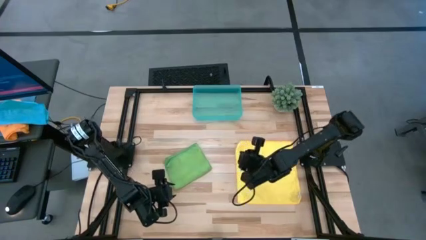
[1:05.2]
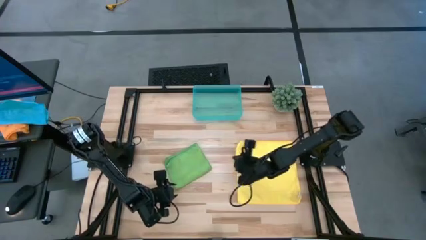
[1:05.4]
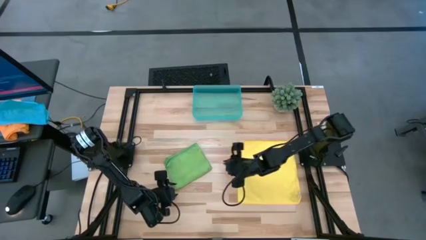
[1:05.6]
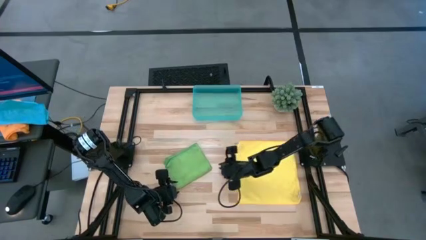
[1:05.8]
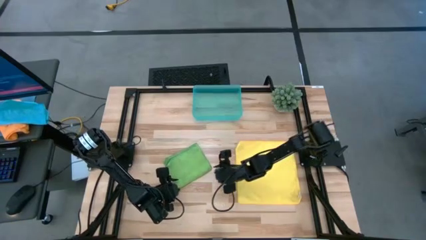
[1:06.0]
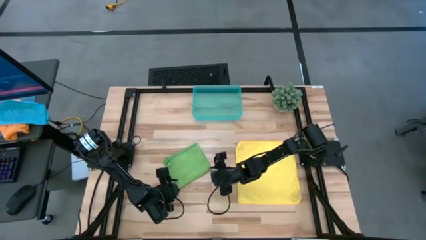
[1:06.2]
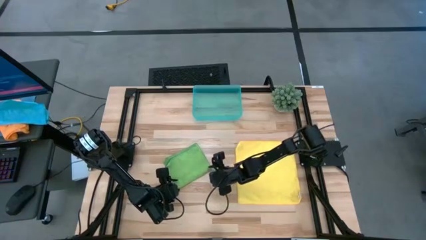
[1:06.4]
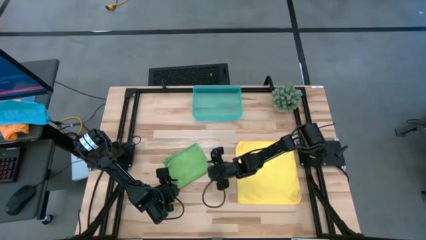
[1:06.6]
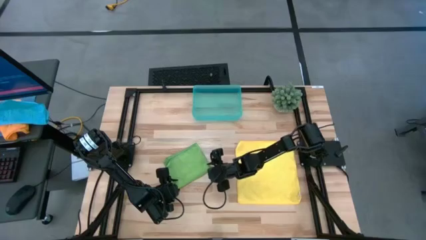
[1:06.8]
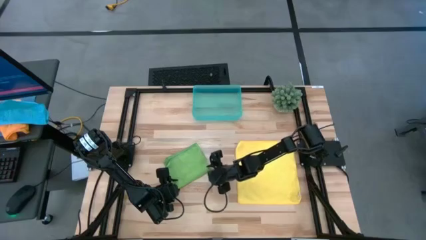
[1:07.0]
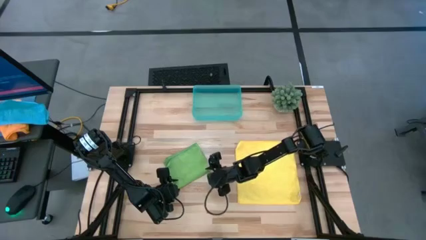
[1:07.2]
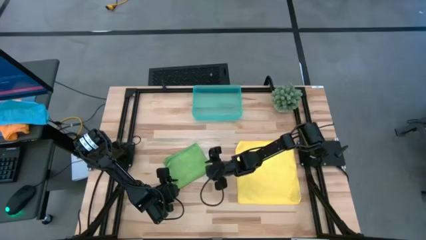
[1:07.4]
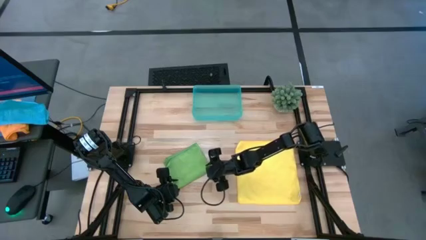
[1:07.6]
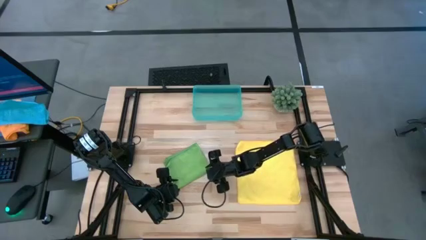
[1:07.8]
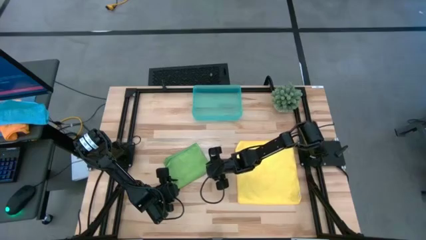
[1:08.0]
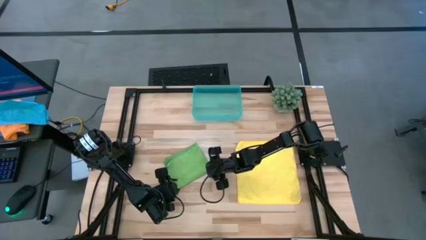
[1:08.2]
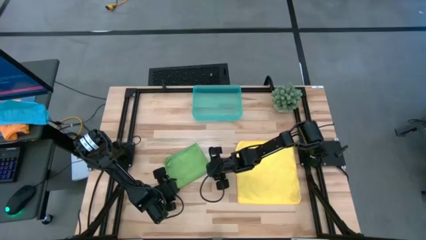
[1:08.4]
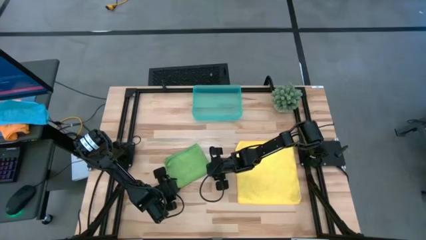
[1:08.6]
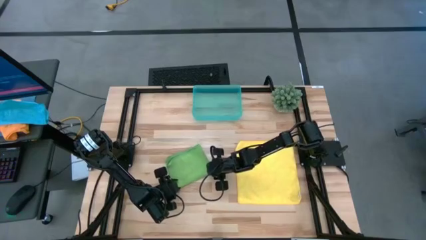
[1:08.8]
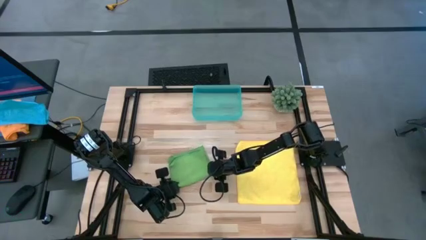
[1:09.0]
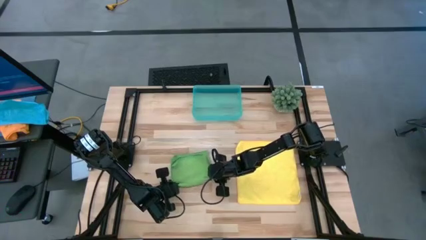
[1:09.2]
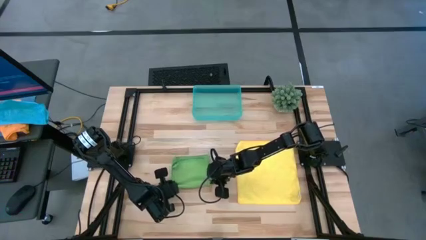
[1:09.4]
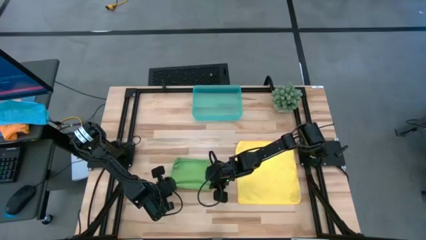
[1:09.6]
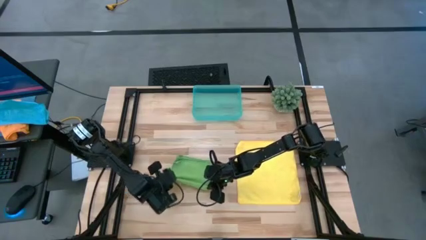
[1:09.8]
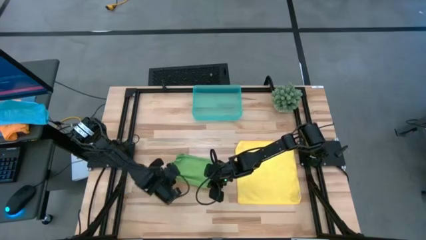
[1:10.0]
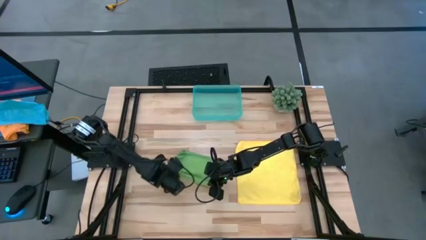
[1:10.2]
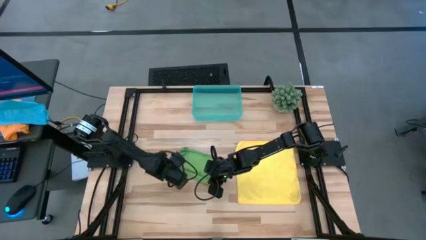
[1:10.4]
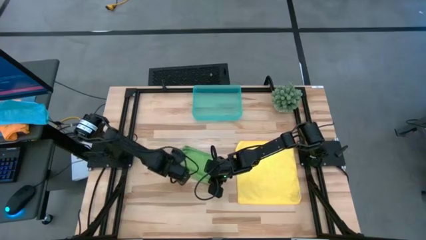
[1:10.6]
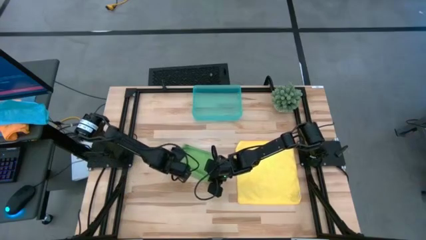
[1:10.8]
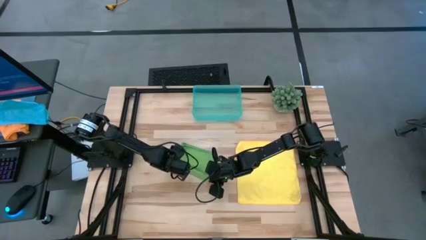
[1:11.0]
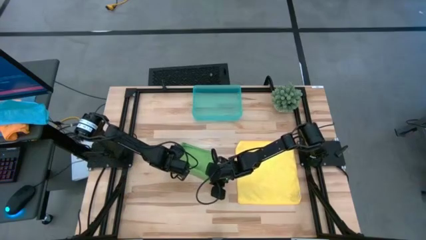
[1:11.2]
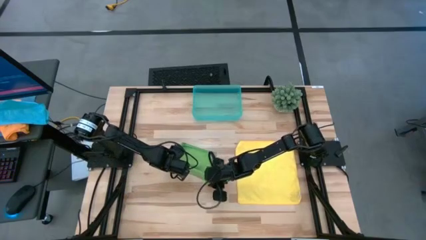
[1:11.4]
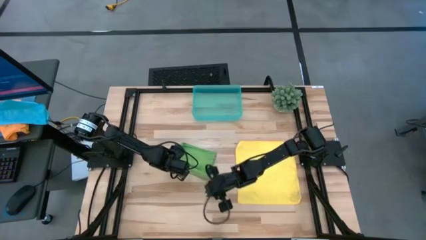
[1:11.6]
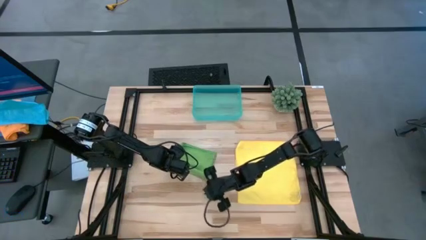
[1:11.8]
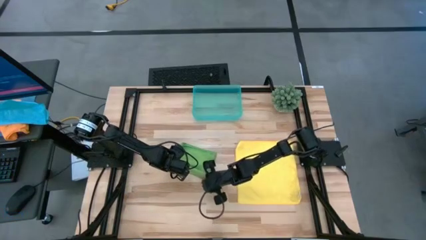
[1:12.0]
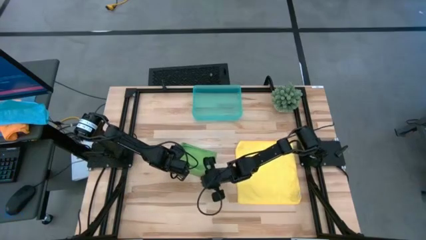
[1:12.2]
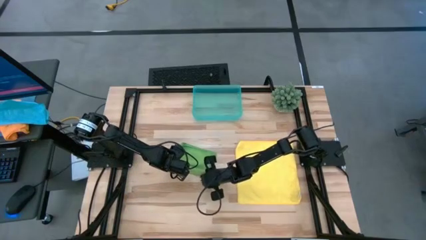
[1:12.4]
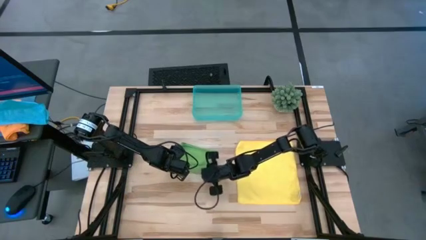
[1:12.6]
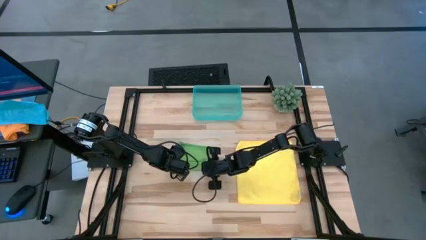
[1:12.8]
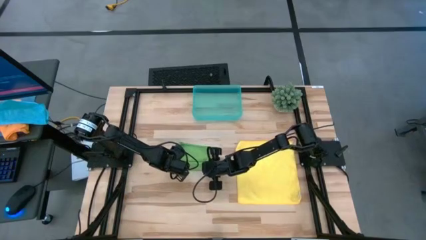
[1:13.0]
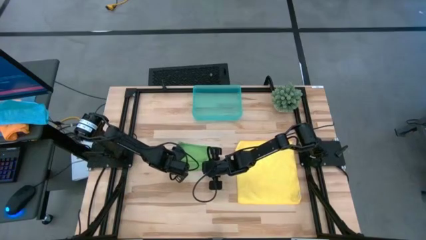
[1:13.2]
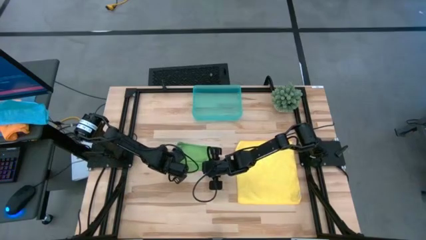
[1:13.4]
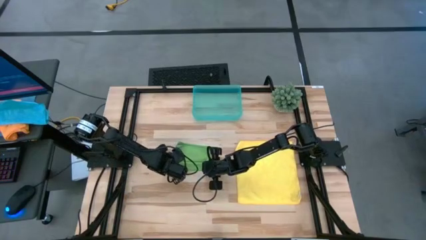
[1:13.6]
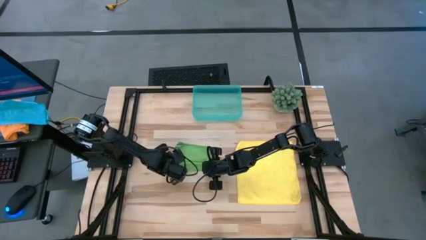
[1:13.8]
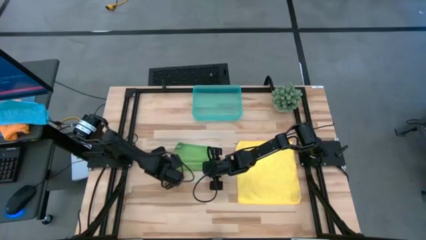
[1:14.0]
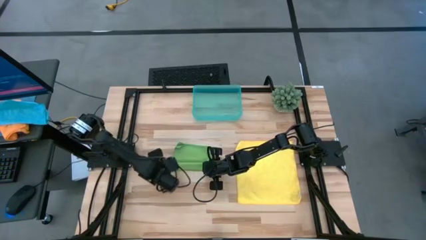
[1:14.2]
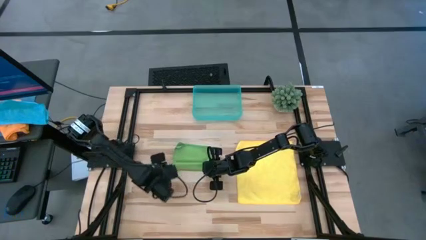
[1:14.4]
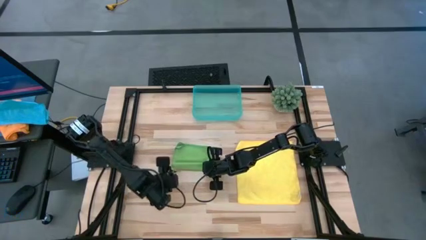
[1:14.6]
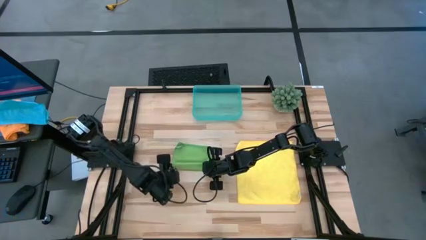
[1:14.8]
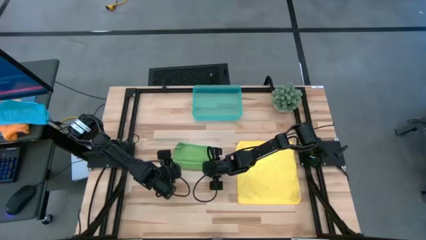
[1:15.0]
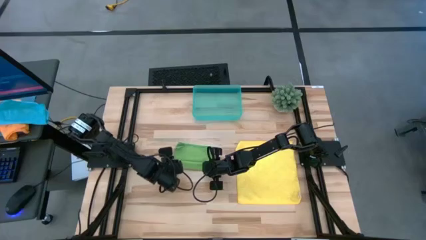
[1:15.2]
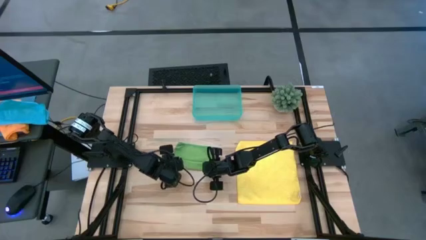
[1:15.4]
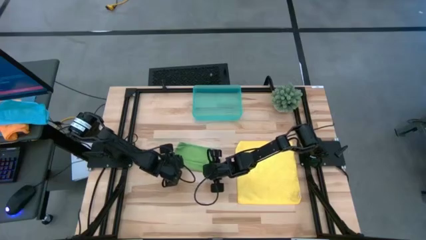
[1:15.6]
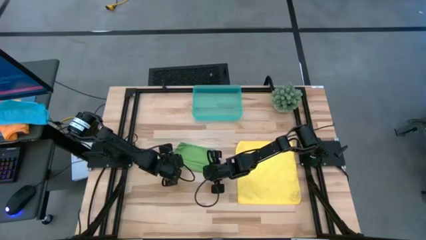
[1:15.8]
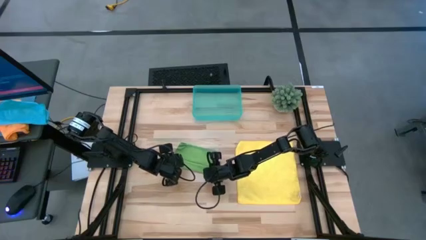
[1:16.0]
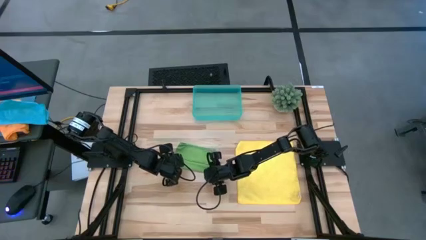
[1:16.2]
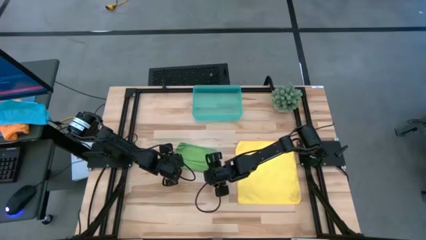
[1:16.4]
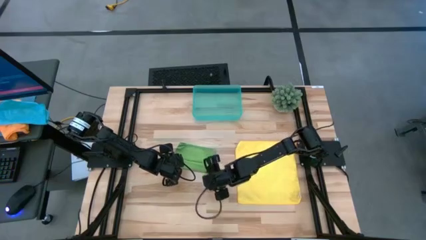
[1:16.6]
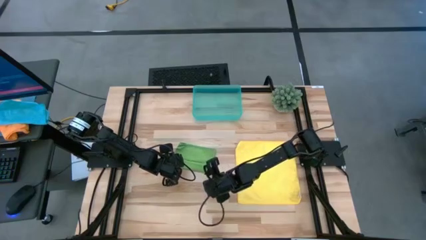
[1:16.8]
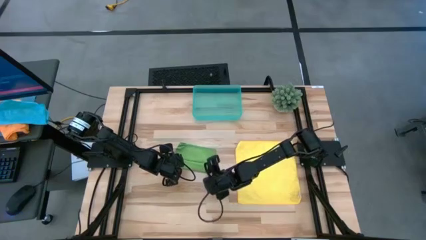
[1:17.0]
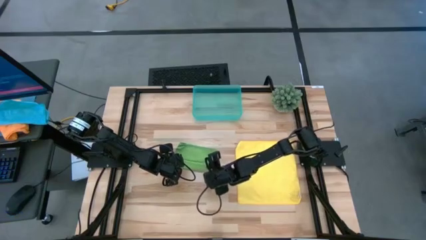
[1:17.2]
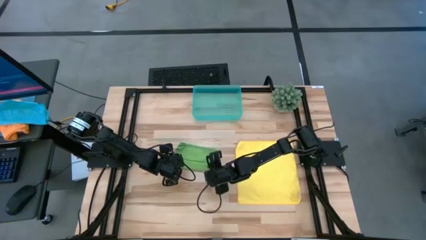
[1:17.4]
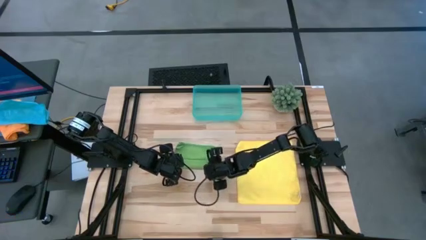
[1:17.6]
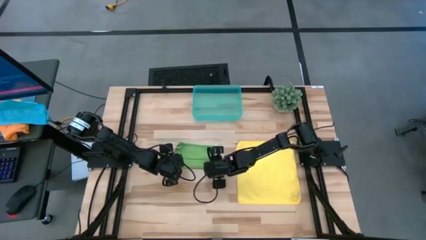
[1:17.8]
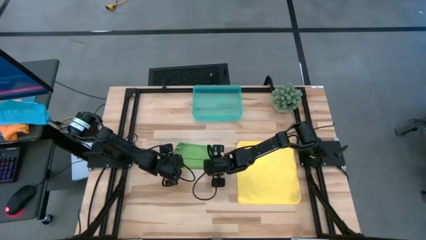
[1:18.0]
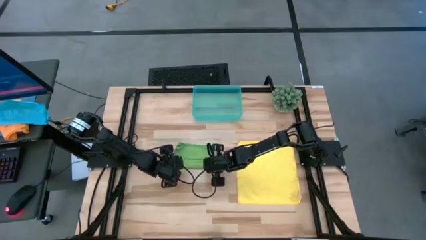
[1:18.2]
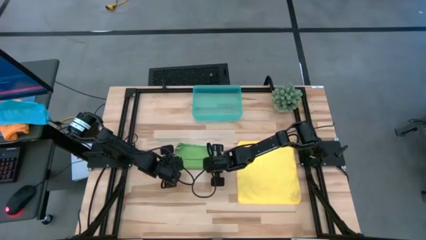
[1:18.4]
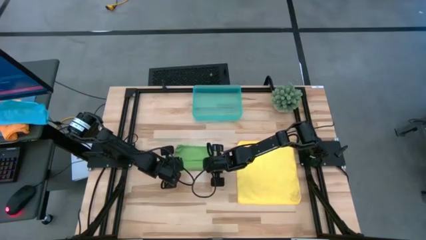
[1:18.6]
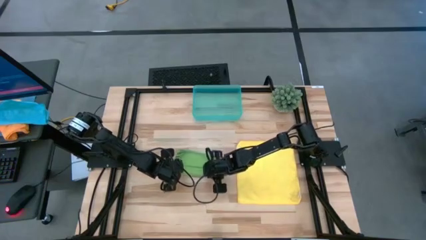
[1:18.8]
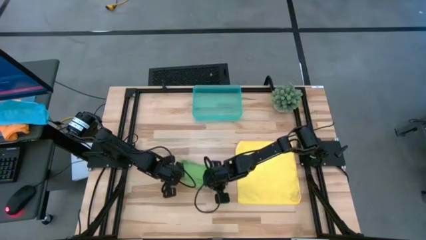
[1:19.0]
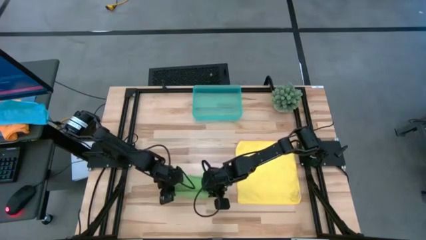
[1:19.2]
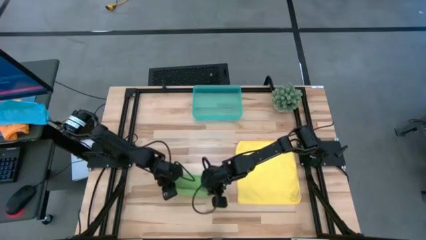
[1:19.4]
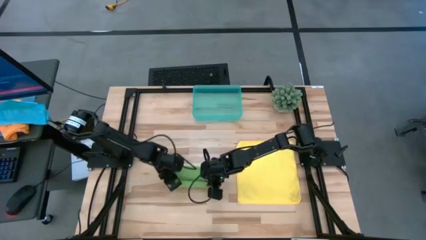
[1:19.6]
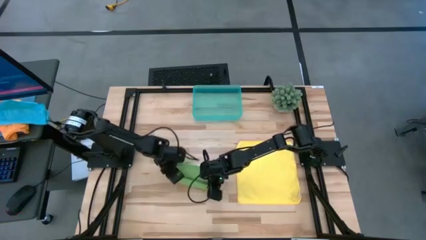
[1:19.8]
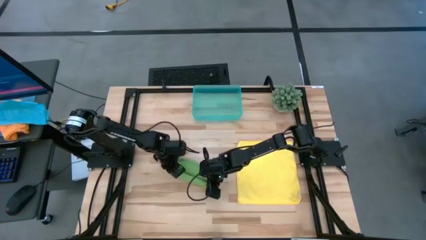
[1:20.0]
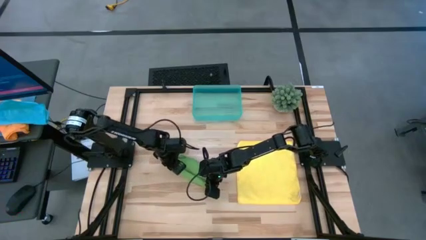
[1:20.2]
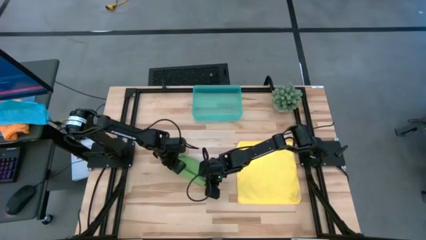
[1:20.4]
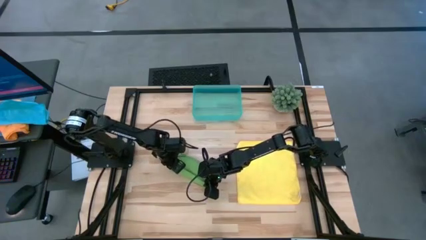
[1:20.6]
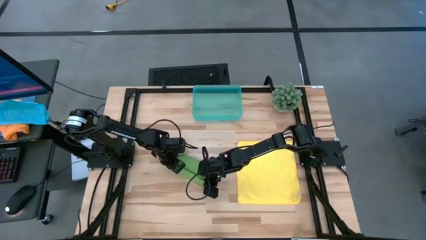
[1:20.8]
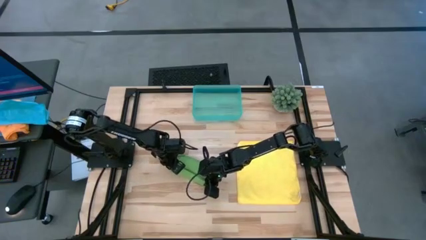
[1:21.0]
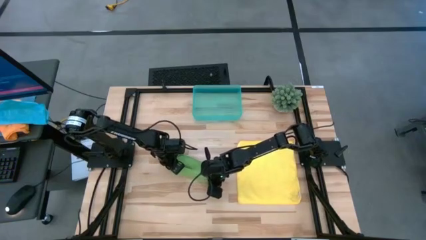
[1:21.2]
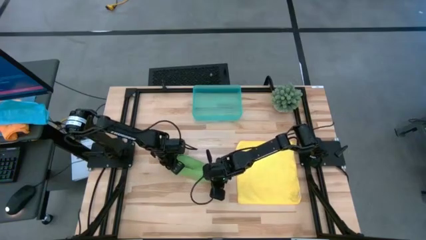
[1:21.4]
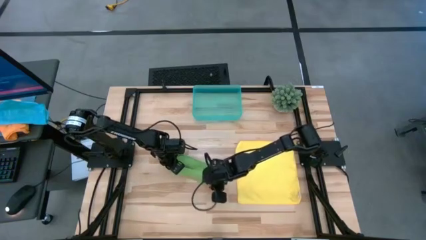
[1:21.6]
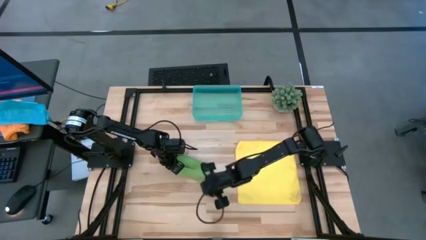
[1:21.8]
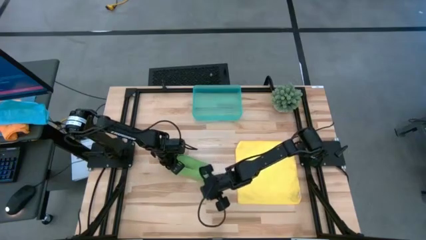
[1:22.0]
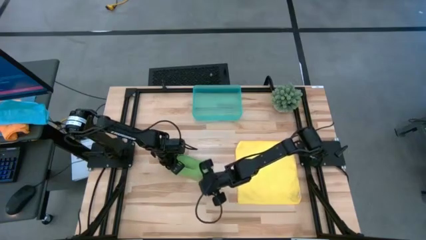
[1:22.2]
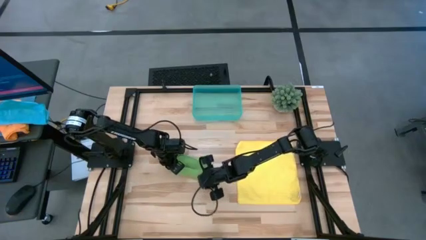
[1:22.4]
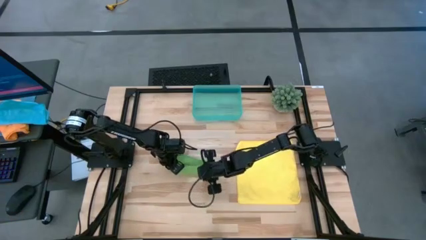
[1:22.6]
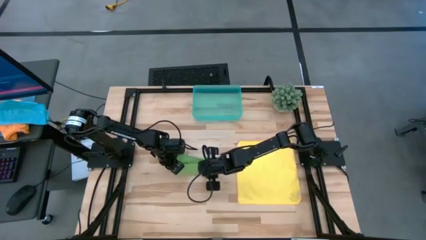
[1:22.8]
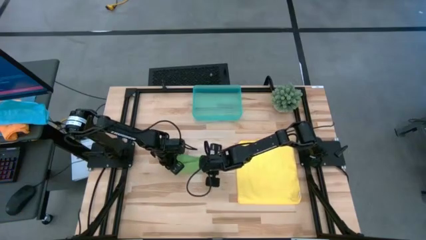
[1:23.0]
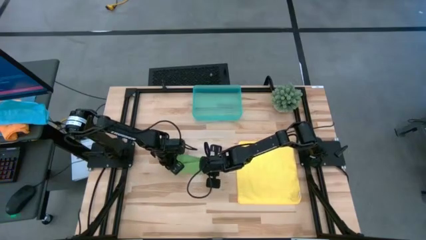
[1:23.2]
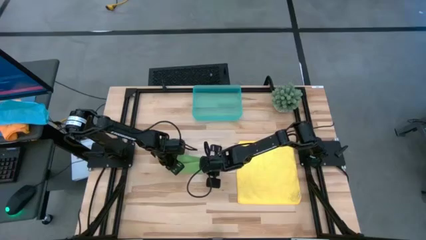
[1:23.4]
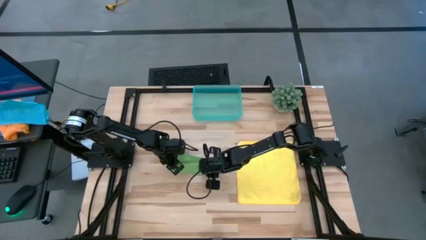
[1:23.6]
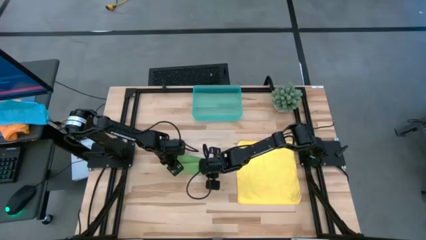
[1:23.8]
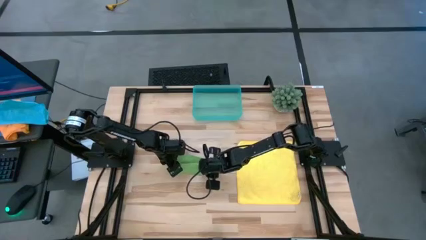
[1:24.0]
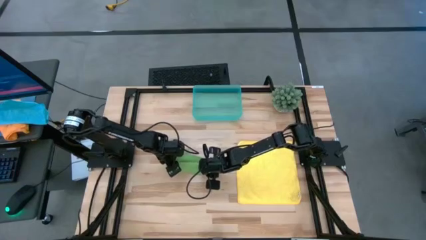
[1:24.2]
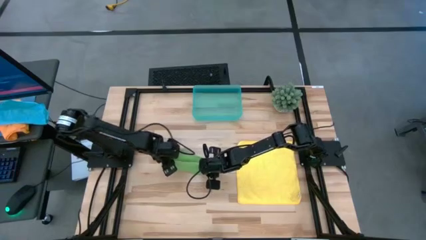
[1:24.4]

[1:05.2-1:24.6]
Task: Roll microfiber towels into tight, uniform cylinder then place into a basket
Roll the green towel
